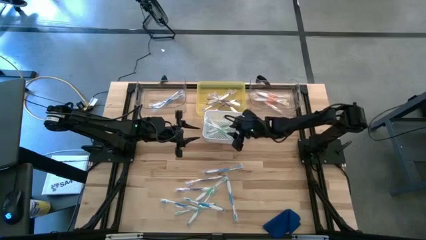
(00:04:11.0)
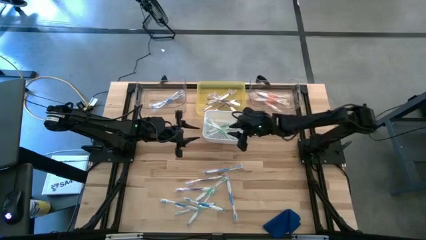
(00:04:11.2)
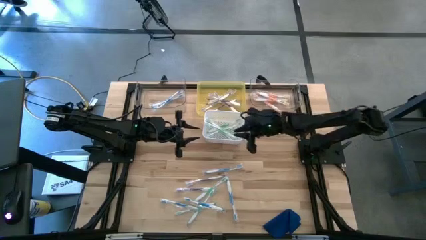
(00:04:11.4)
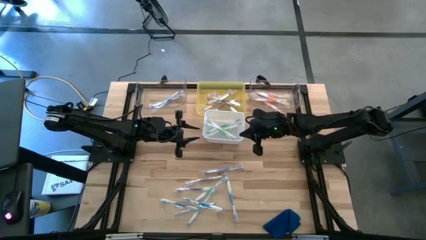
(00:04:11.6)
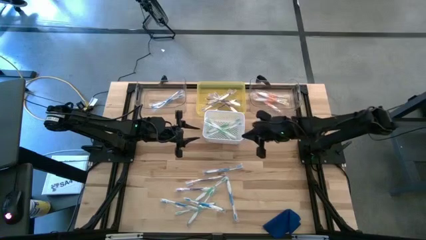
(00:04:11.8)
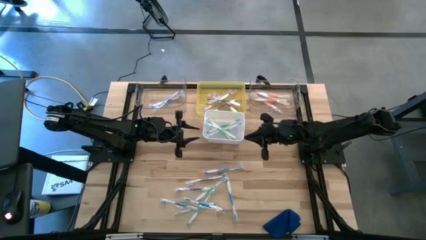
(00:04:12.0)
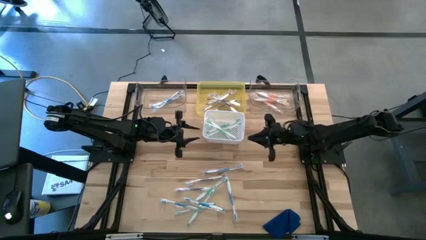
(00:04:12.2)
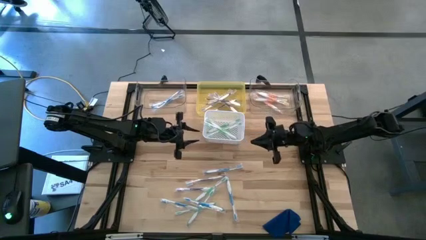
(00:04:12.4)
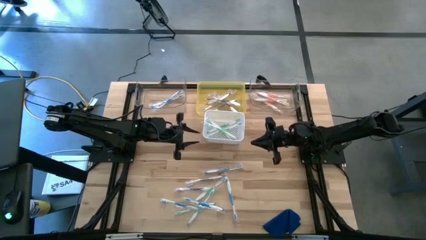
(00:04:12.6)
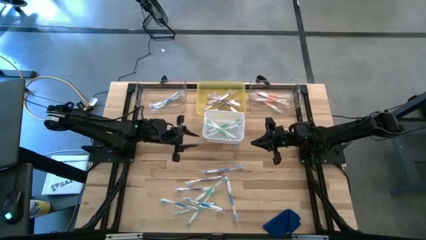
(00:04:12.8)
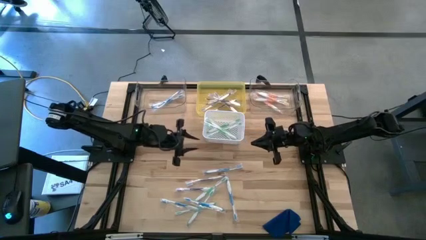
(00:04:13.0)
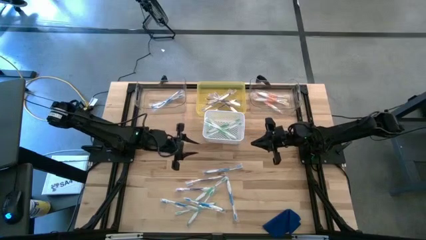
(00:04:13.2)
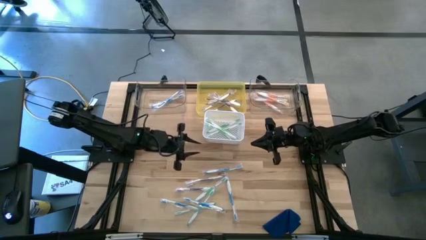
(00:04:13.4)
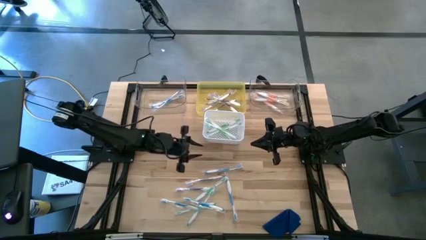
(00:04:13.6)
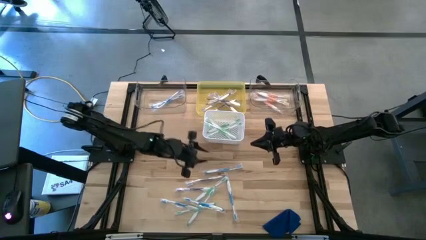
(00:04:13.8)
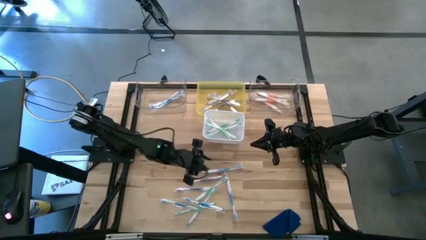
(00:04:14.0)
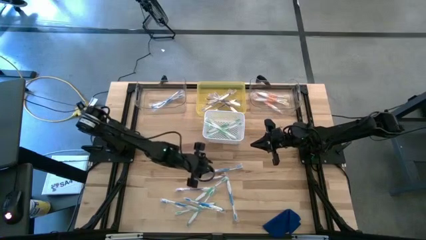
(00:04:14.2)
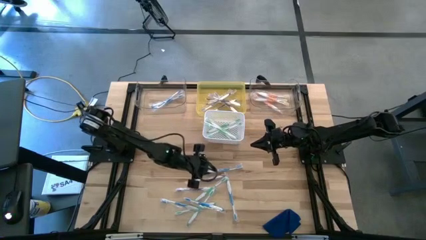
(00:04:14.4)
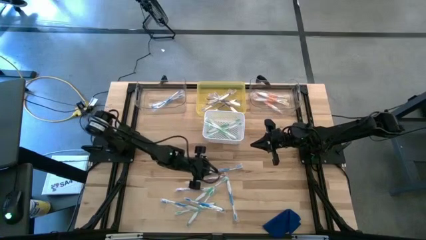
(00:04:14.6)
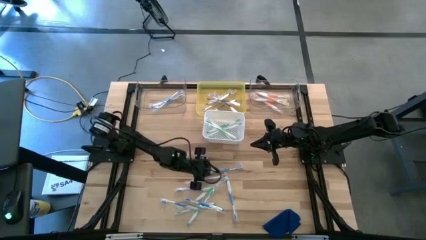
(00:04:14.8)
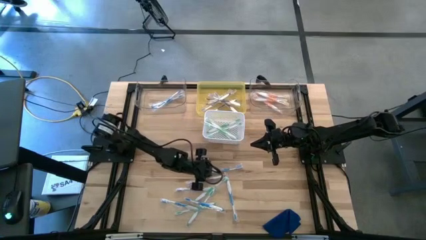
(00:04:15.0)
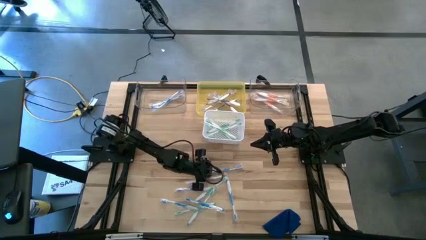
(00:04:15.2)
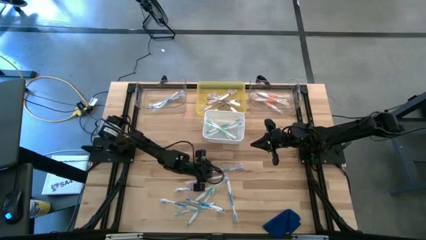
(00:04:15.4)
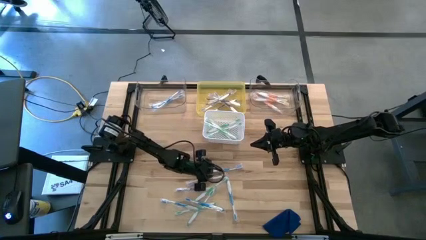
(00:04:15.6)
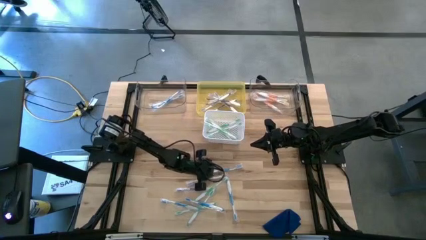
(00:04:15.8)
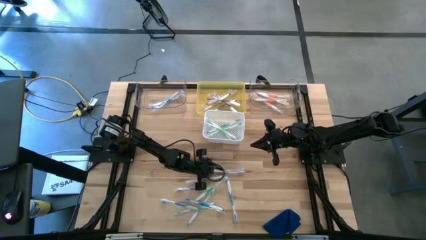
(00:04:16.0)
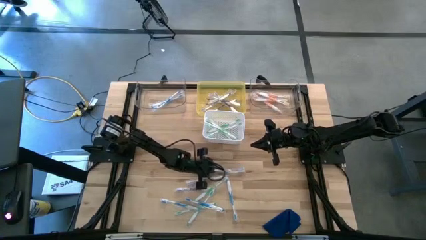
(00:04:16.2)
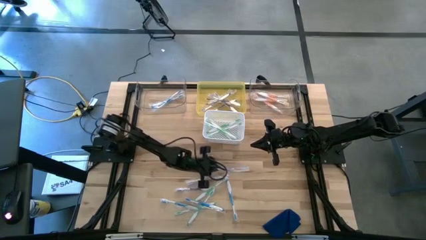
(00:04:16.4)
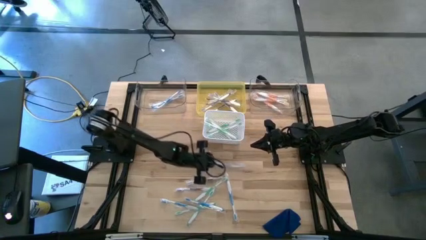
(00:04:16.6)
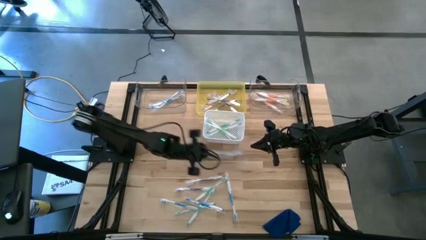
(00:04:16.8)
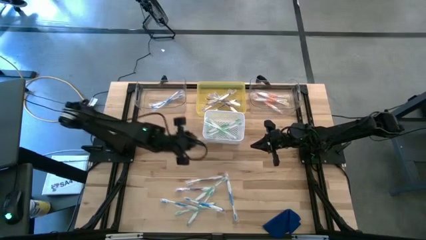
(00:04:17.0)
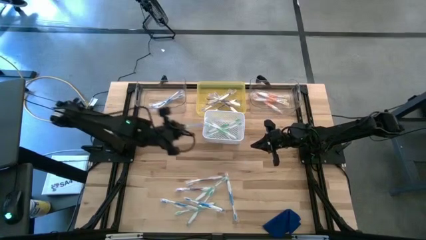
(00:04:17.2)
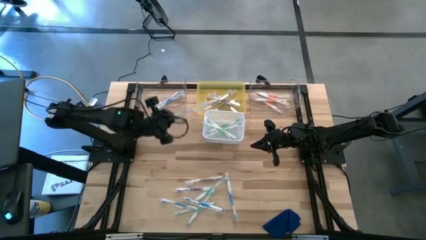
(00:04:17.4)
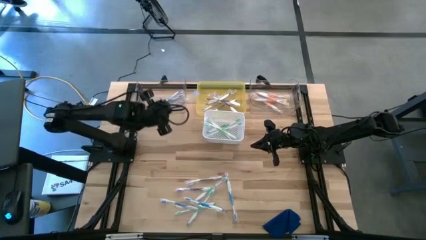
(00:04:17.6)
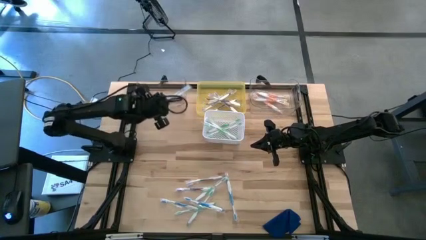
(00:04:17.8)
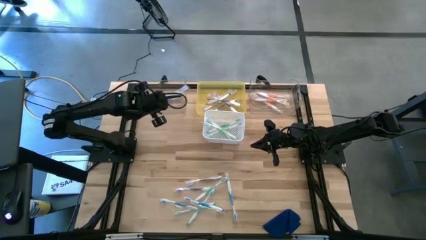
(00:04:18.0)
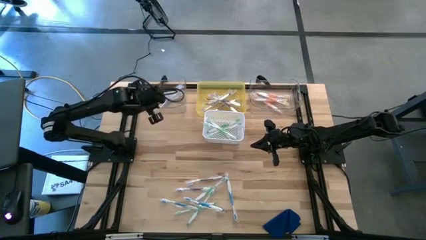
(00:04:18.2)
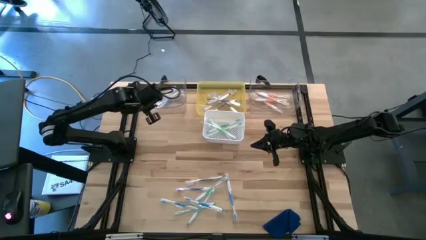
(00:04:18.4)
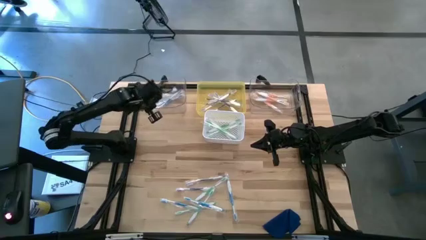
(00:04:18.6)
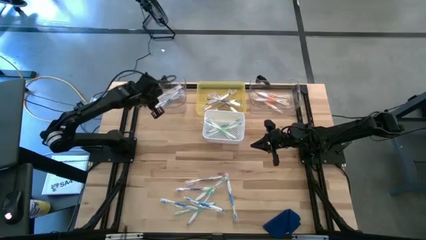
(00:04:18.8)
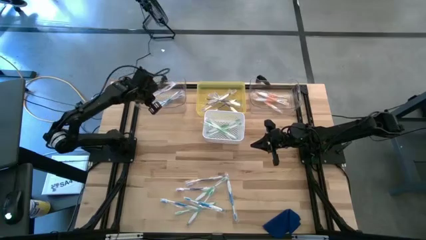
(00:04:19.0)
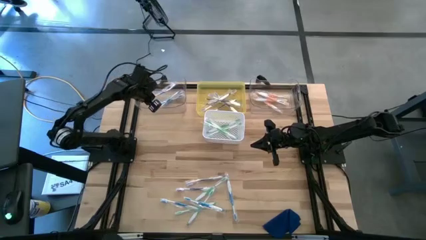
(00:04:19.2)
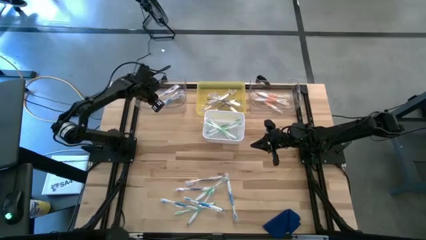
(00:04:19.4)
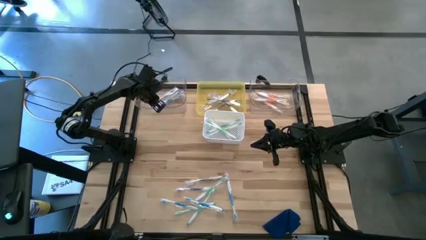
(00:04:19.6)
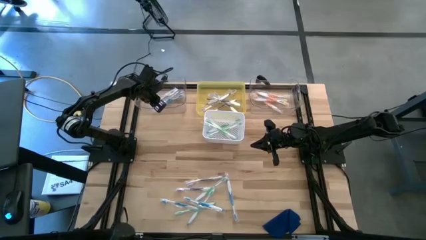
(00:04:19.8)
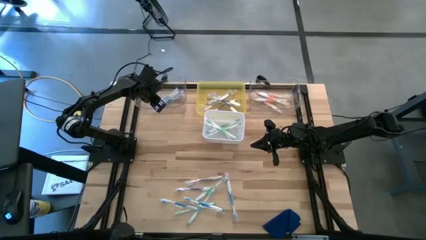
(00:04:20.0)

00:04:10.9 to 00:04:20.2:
Task: Pick & Place Toothbrushes
Put the blue toothbrush into the left transparent bin

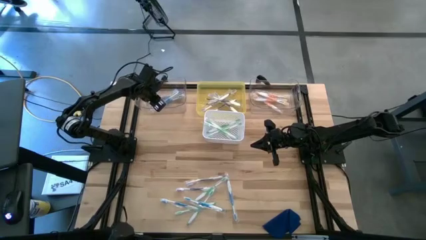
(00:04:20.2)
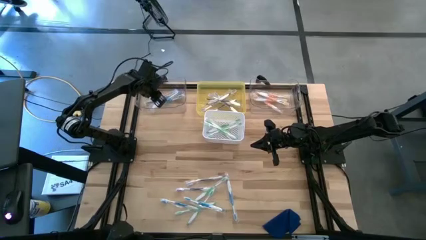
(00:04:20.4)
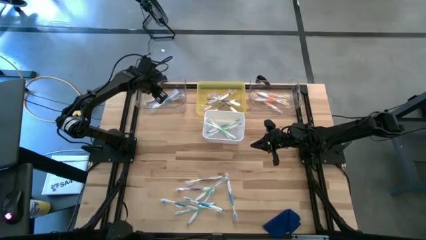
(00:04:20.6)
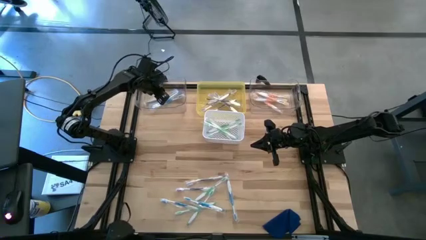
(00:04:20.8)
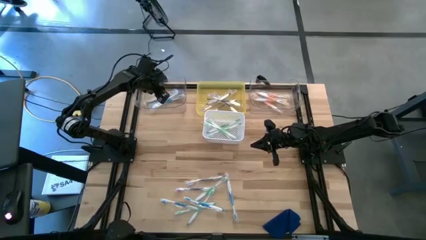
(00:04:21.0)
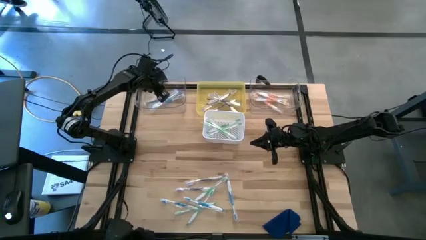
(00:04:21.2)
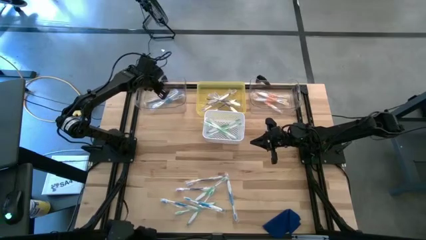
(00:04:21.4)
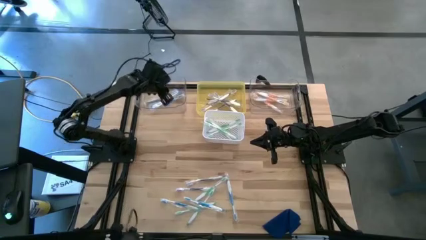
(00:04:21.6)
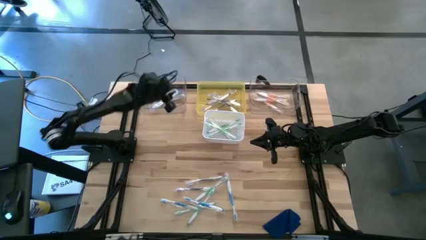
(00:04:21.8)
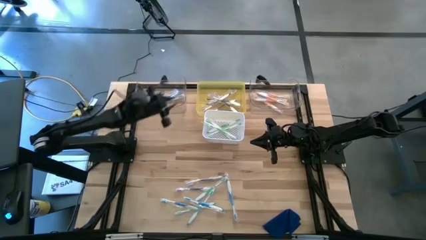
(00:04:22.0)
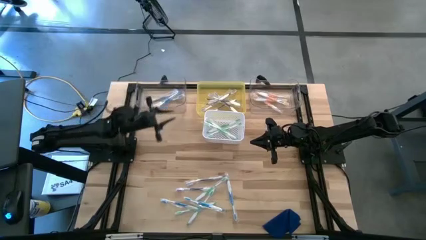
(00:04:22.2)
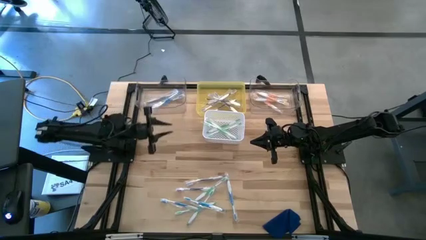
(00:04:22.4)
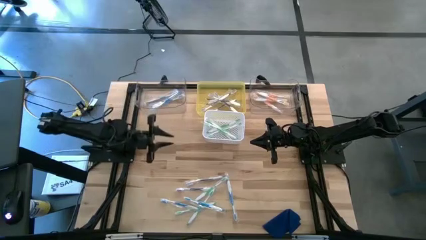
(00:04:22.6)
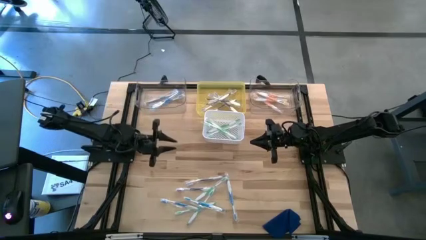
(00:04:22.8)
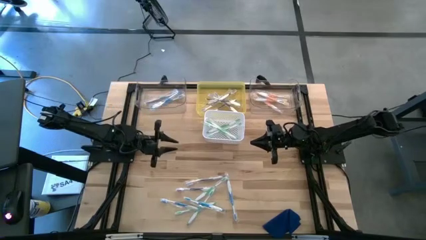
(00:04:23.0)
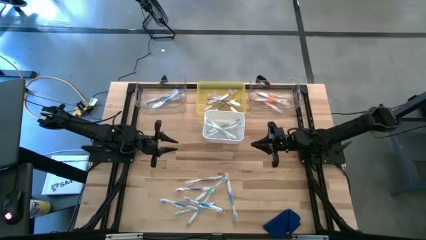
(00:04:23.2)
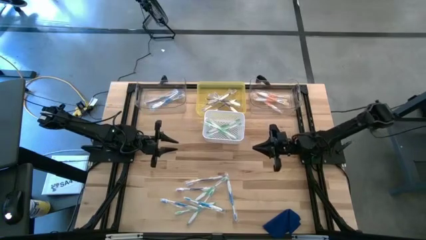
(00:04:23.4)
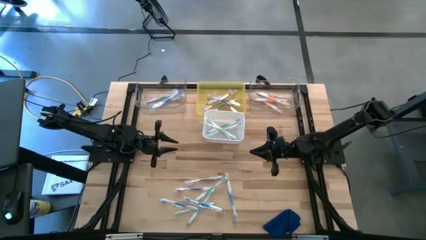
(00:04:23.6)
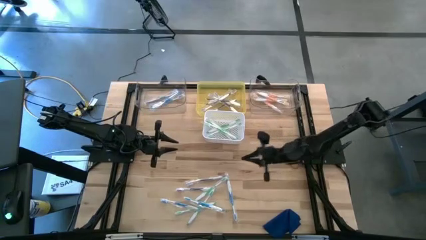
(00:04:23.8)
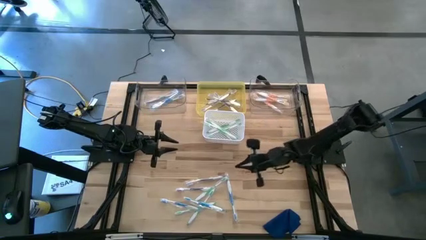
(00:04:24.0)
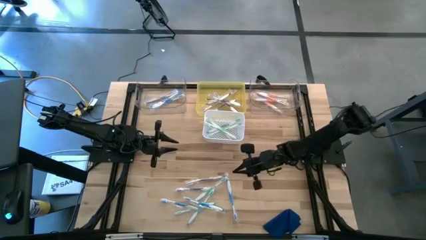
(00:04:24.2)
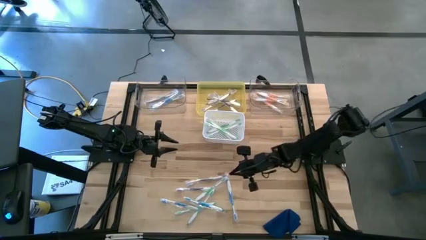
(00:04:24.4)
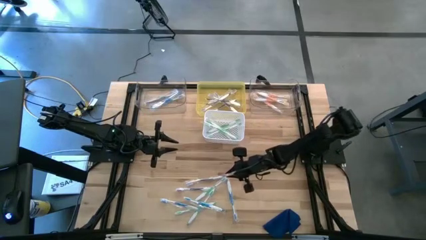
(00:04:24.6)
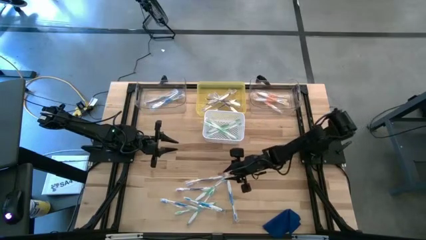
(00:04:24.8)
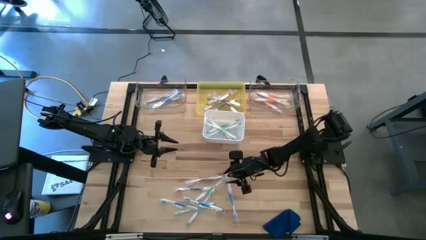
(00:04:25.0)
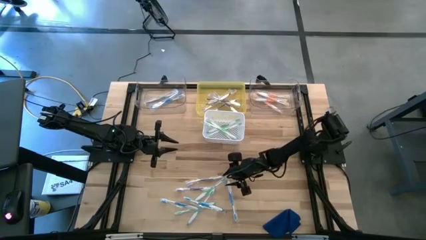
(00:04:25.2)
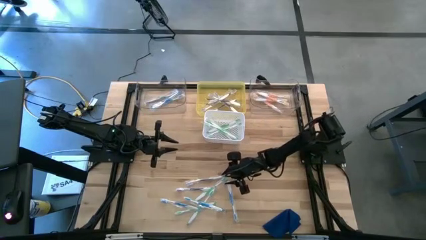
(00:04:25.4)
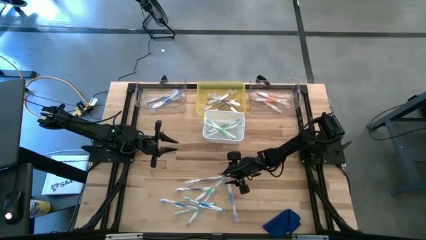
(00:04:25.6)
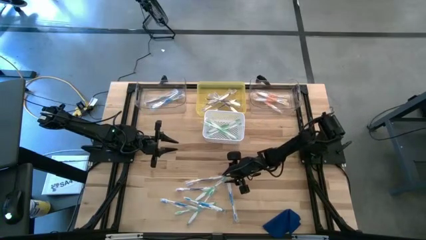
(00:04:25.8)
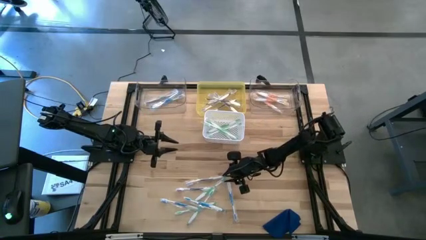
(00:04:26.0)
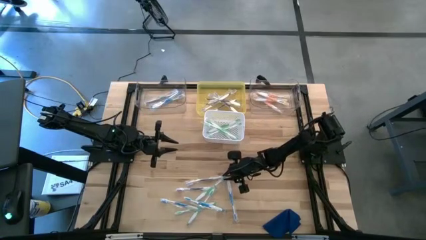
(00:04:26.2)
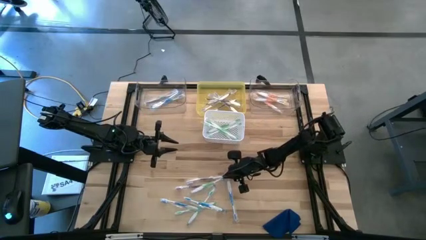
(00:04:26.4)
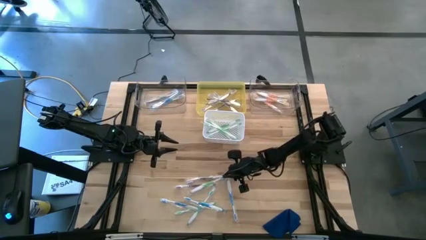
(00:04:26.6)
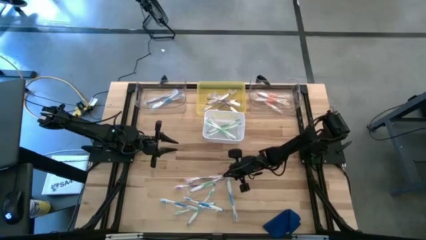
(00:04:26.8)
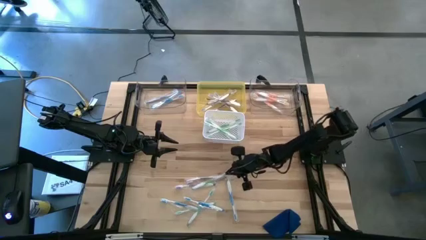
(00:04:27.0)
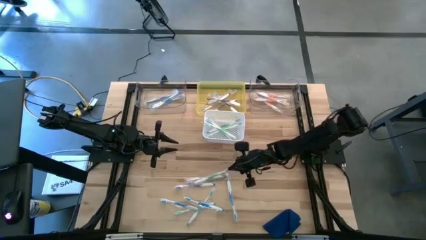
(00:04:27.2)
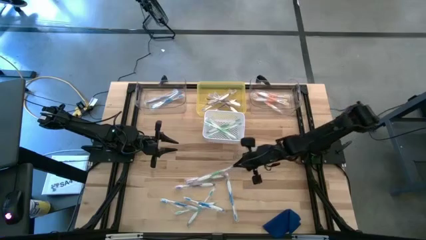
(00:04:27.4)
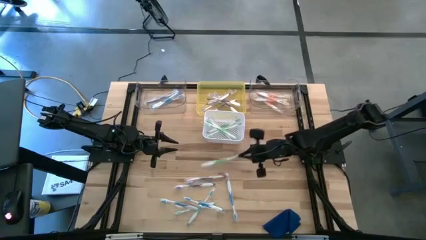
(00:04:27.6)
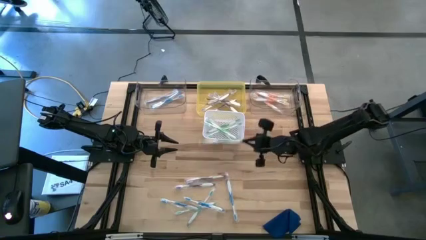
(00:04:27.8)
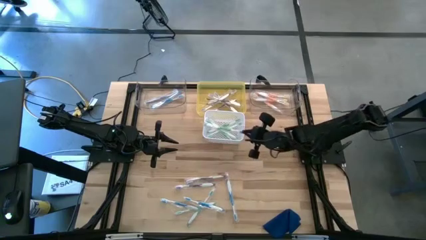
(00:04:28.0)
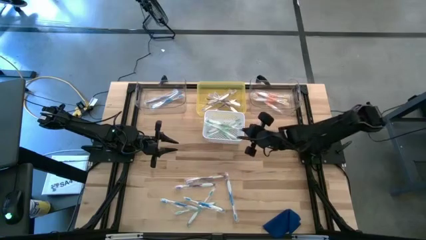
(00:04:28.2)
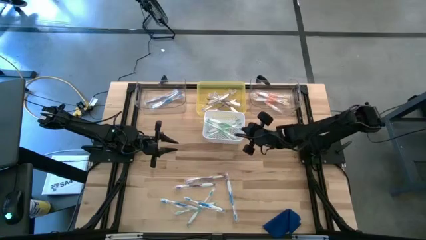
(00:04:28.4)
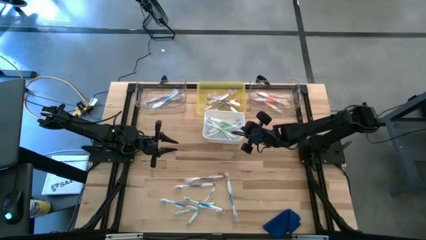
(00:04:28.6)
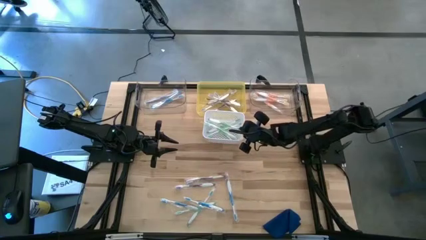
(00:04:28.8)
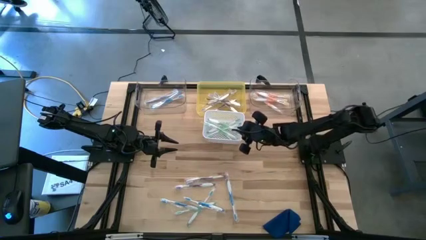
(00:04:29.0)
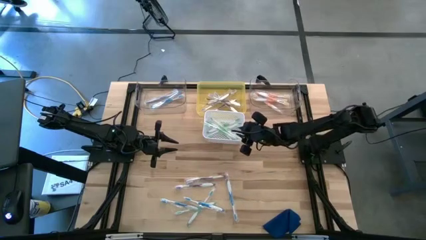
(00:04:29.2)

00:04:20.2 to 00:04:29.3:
Put the green toothbrush into the white bin
